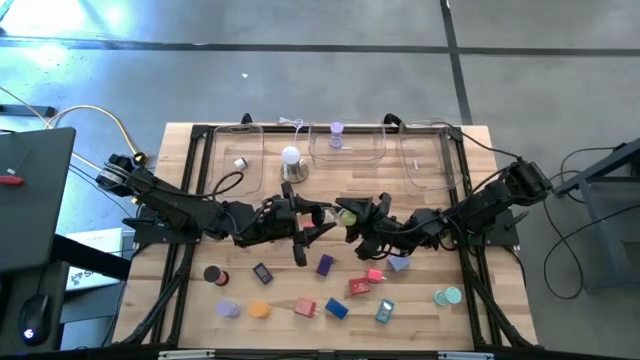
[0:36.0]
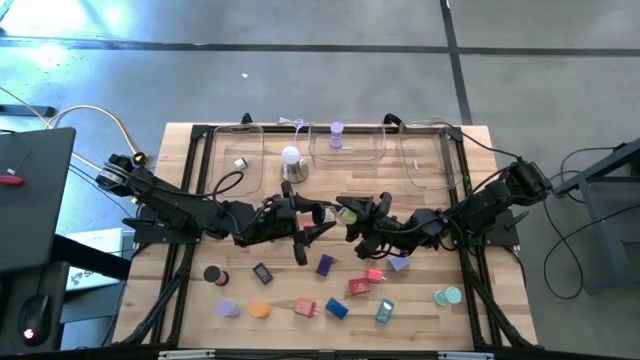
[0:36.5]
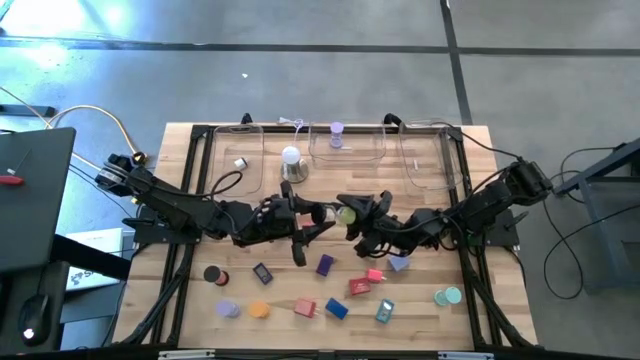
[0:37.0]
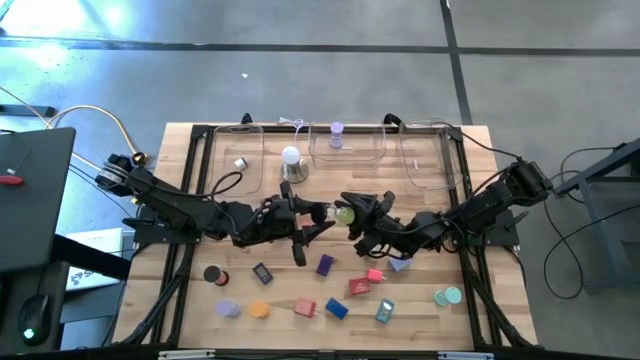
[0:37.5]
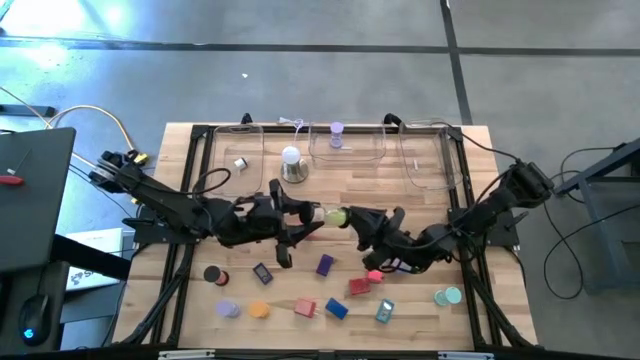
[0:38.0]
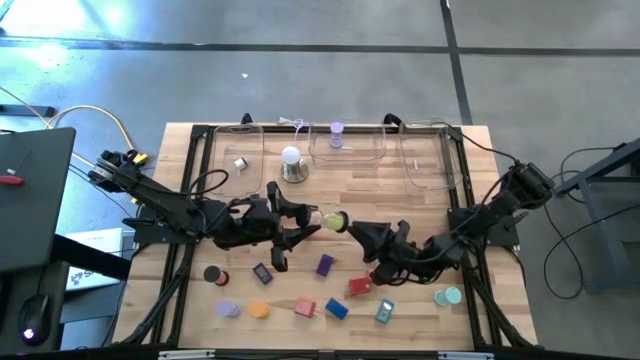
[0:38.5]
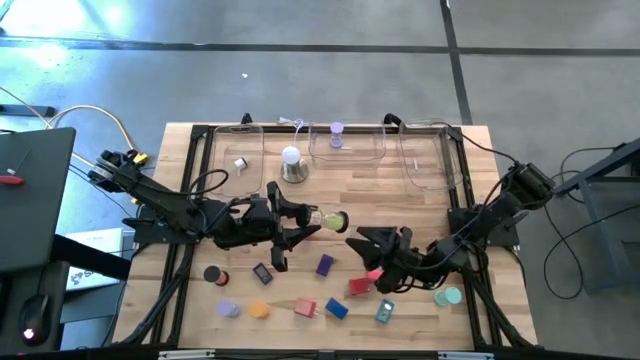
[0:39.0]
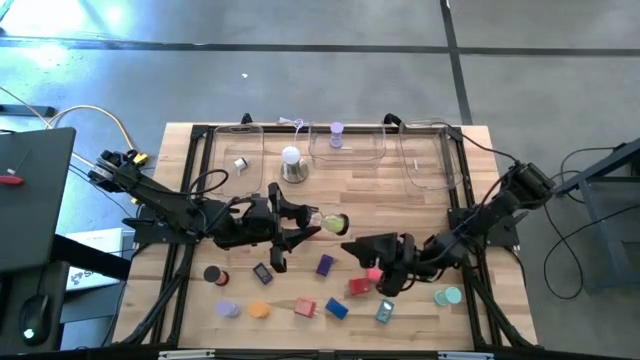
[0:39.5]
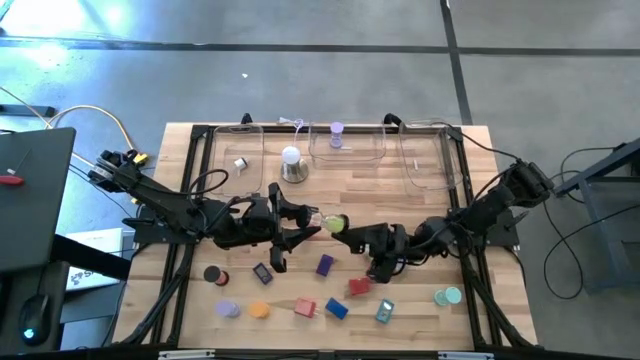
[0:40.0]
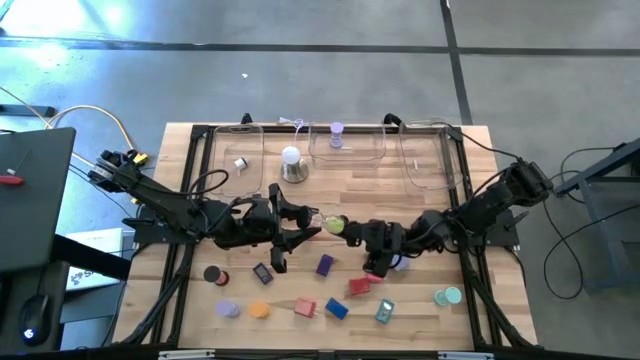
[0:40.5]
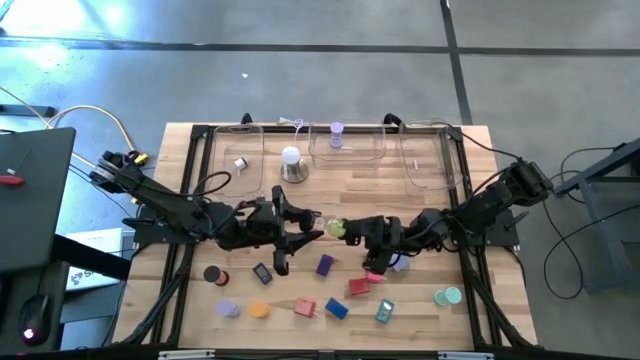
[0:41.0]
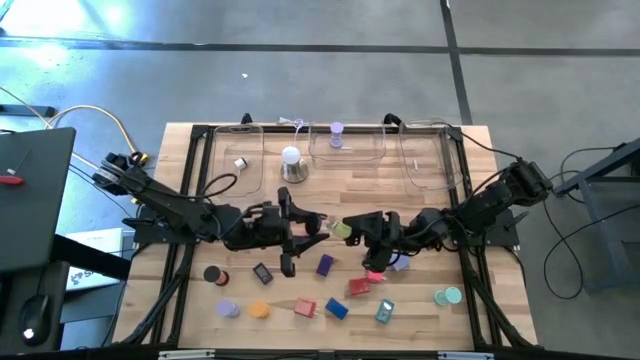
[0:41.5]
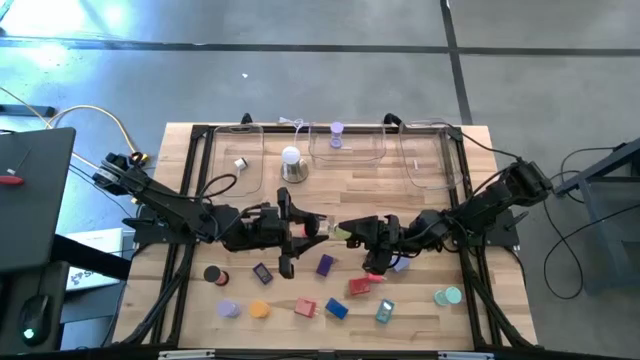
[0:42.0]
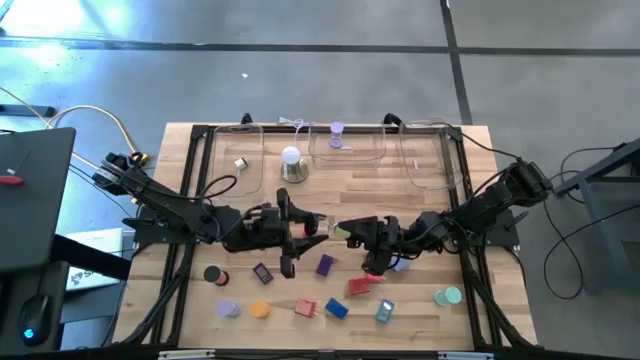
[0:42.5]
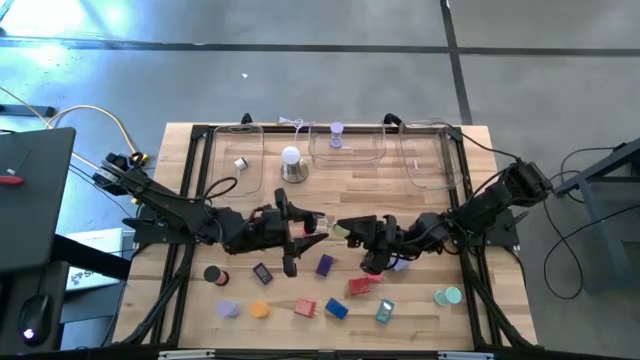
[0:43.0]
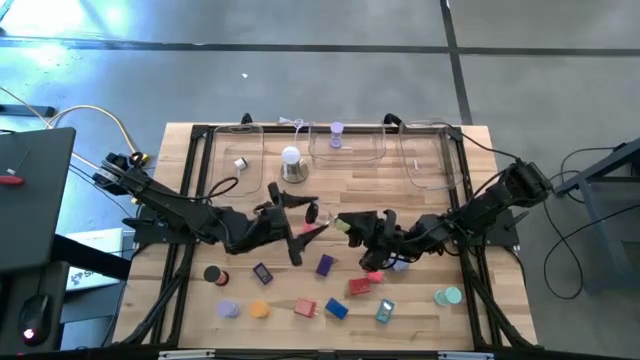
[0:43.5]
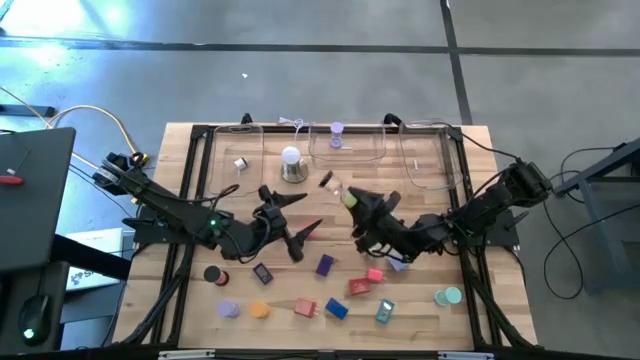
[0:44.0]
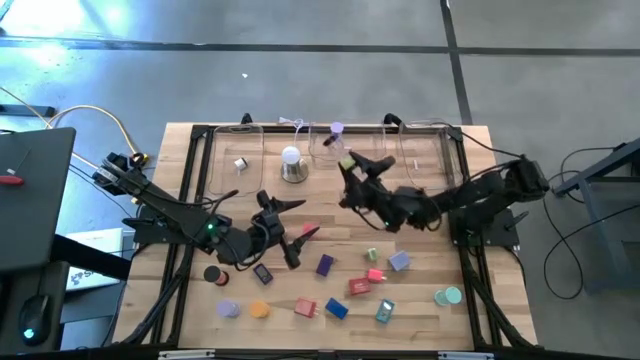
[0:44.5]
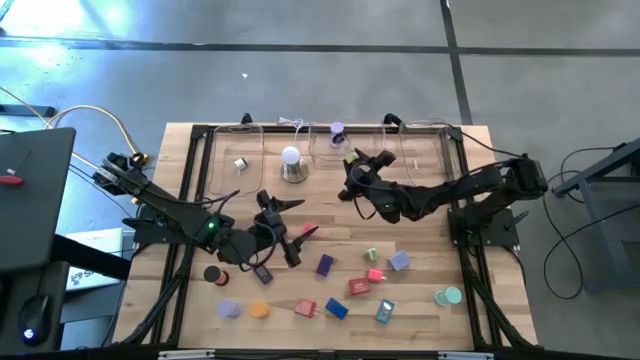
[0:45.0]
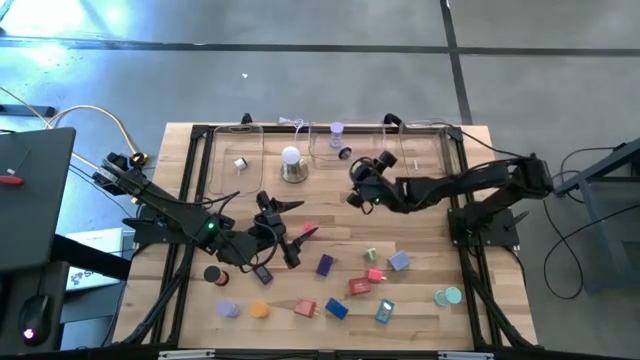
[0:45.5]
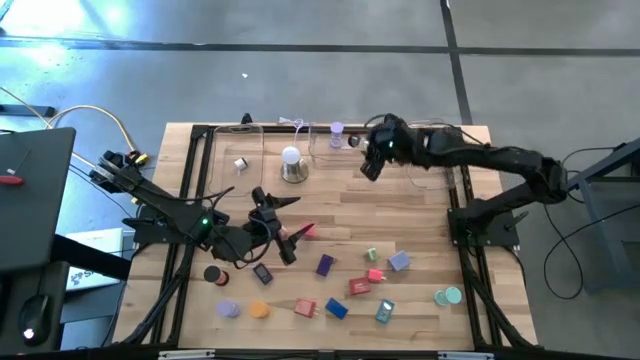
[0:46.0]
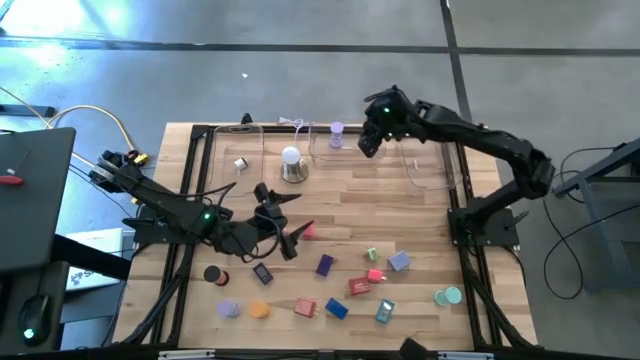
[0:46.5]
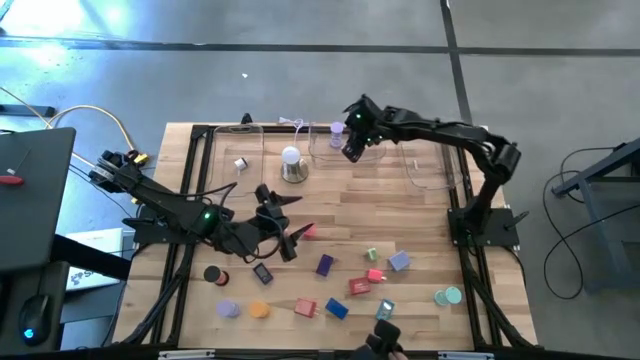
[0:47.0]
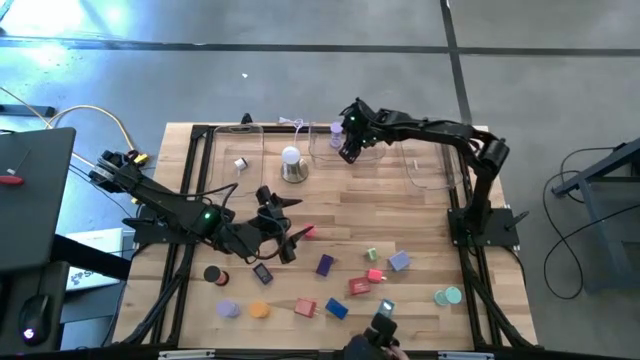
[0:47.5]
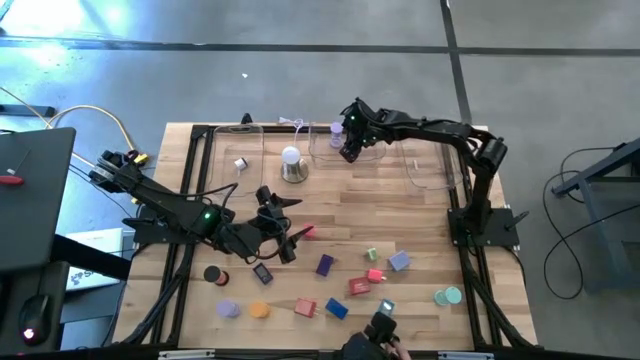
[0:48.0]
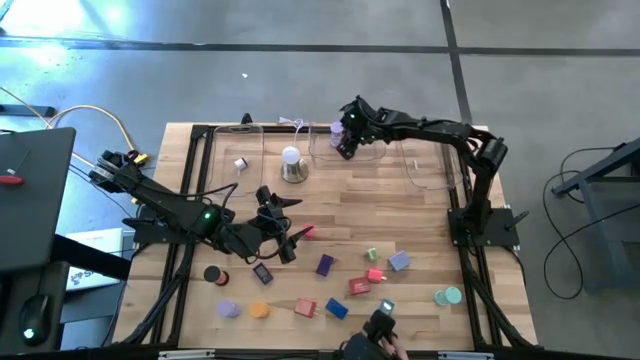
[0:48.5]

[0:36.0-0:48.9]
Task: Pick & Place Office items
Put the green hourglass into the middle transparent bin

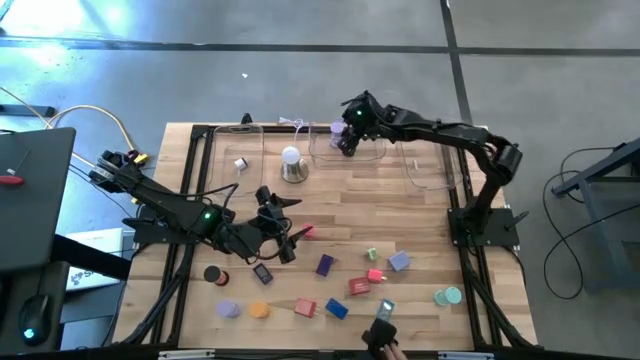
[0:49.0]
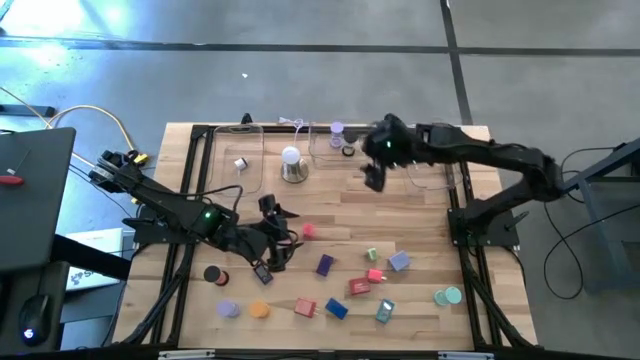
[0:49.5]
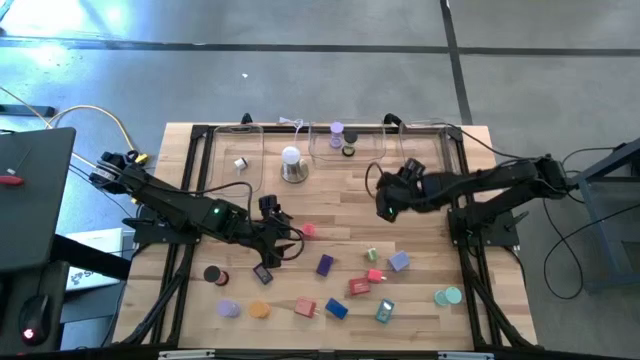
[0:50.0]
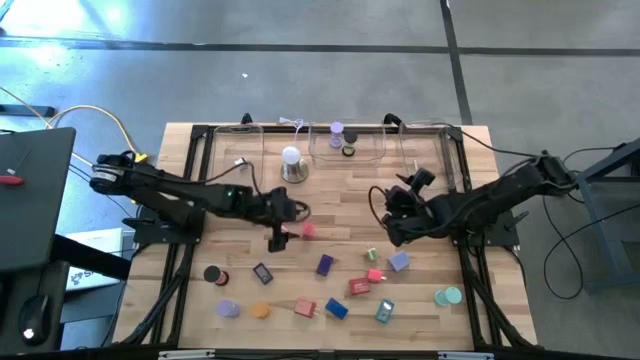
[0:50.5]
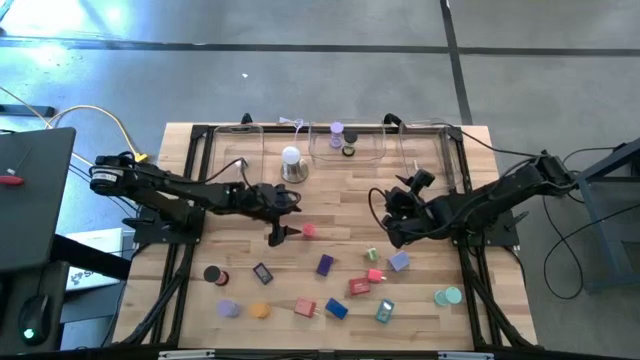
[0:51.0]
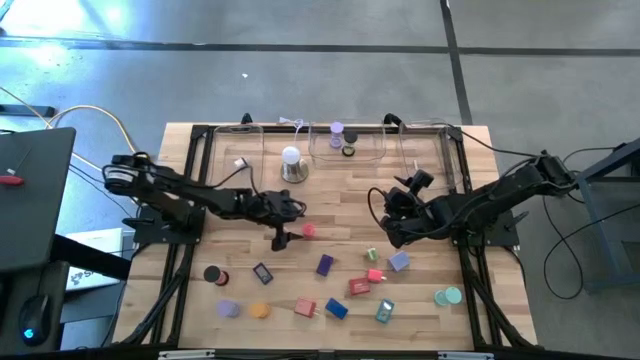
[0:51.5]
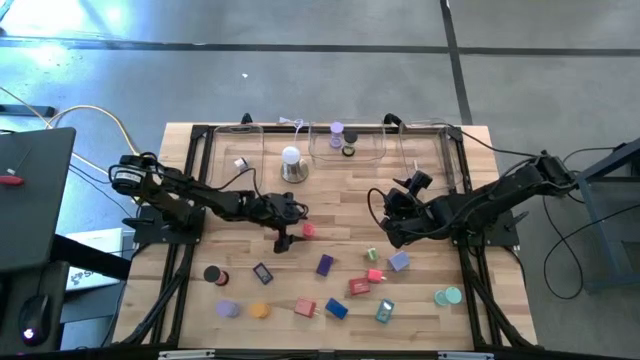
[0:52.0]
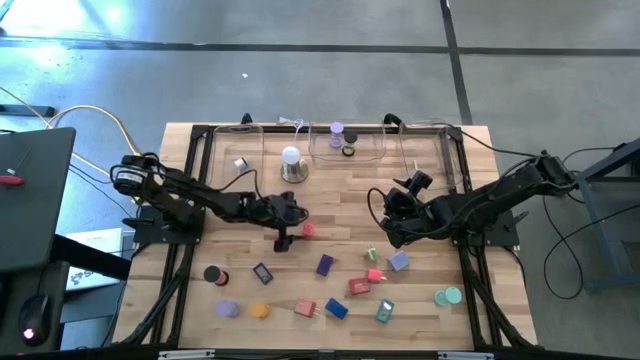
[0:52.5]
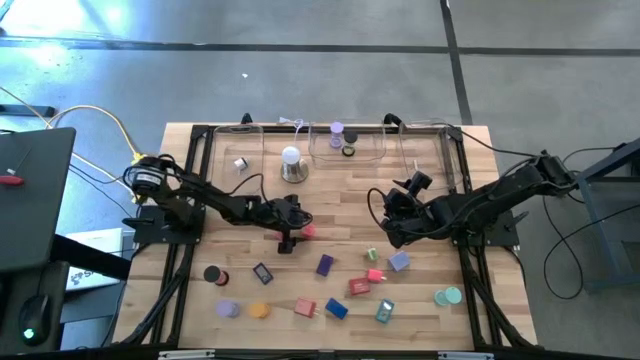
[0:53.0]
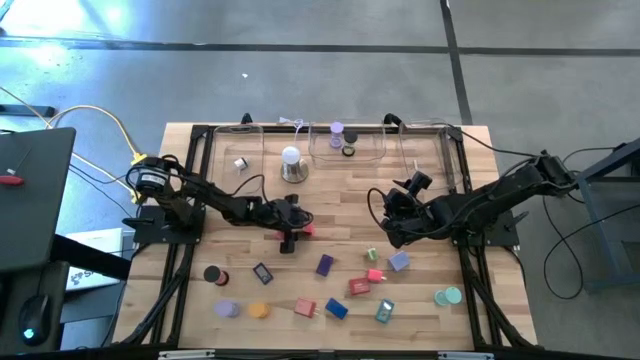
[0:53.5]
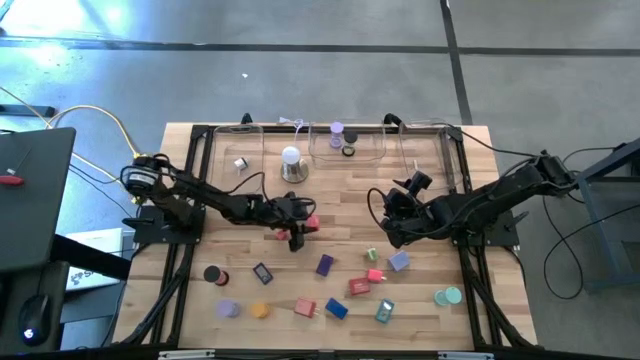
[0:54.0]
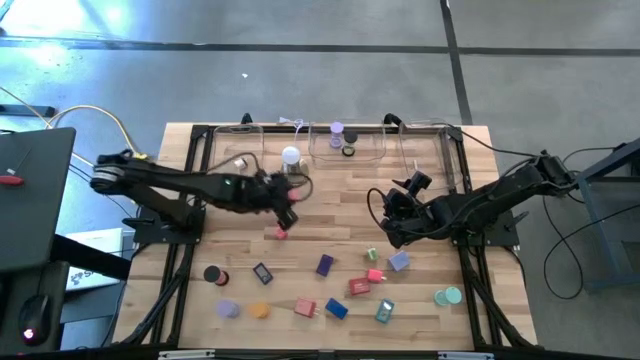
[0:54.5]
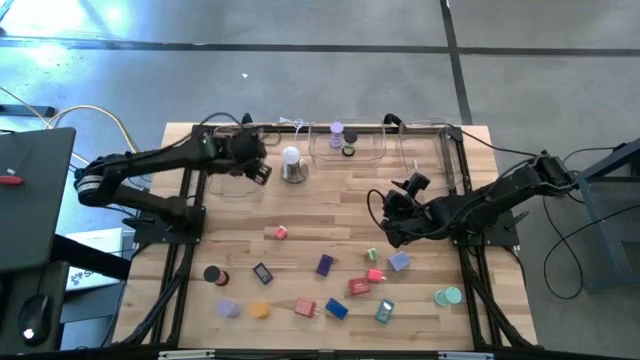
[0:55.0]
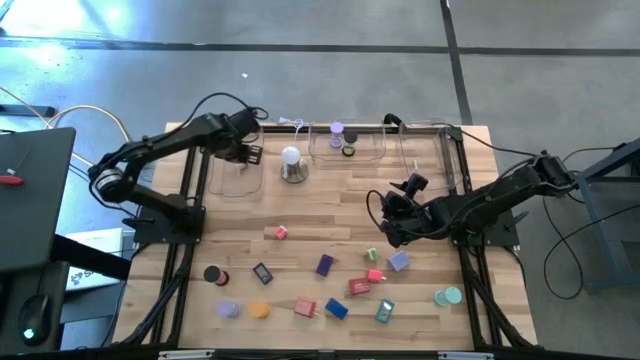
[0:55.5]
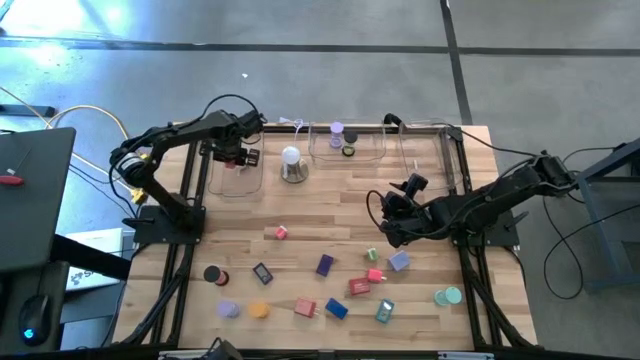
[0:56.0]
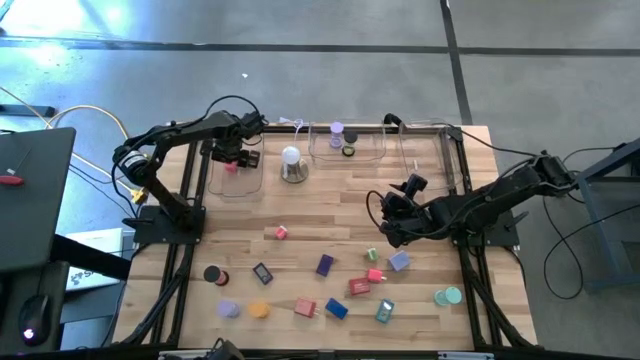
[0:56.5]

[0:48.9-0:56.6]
Put the left light pink charger adapter into the left transparent bin
